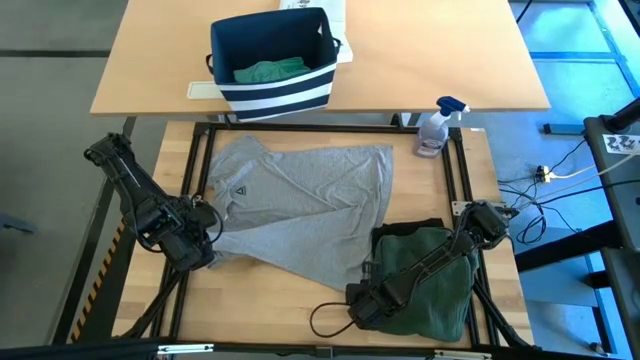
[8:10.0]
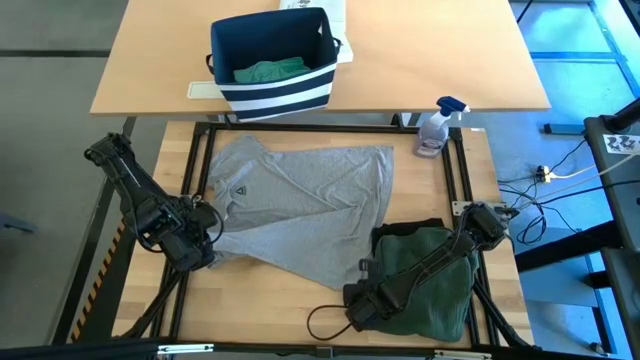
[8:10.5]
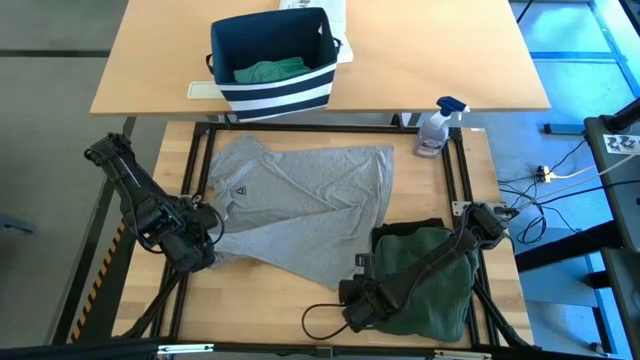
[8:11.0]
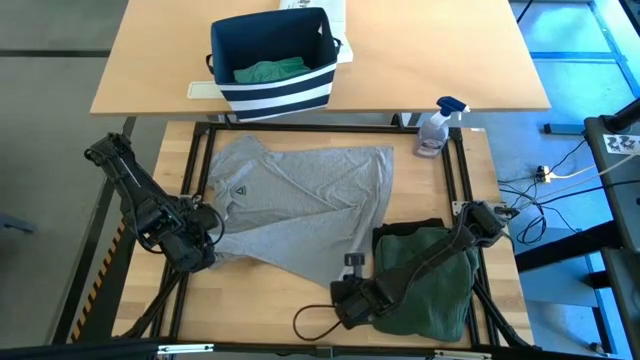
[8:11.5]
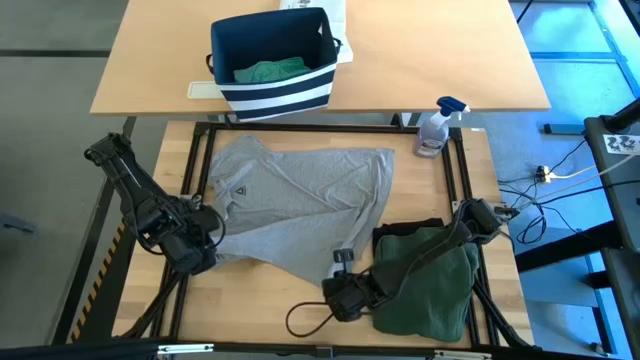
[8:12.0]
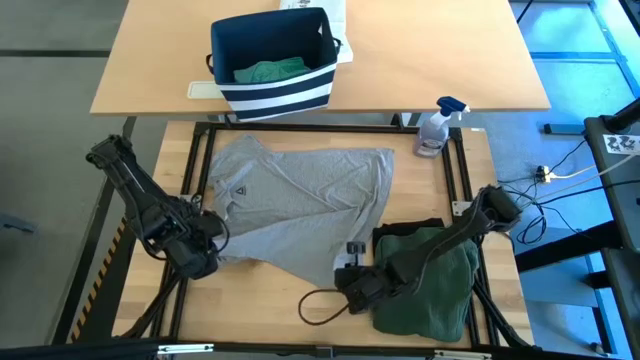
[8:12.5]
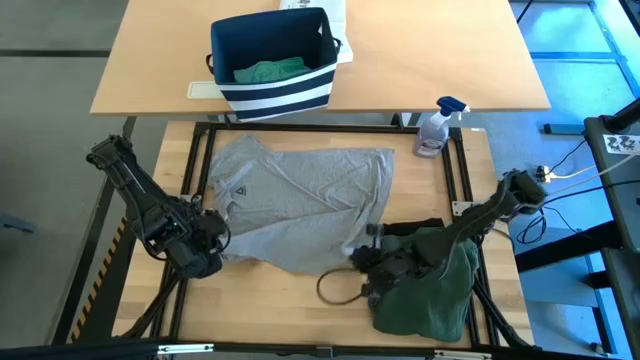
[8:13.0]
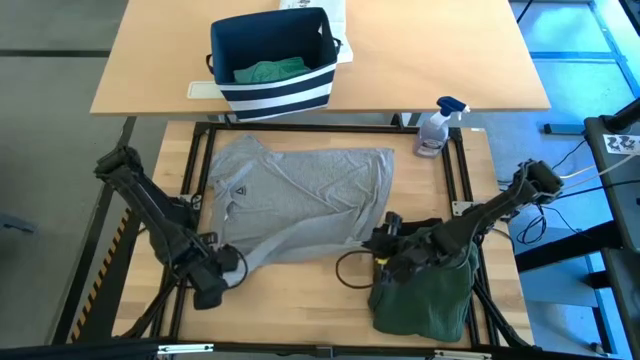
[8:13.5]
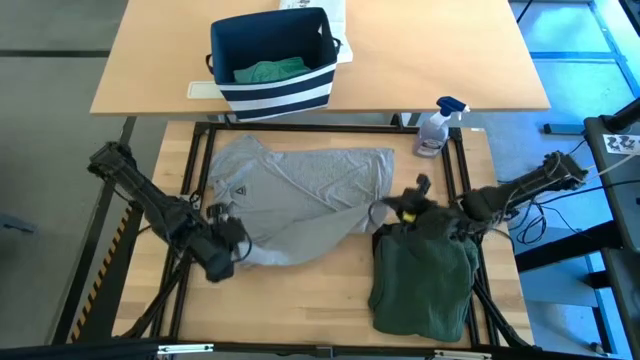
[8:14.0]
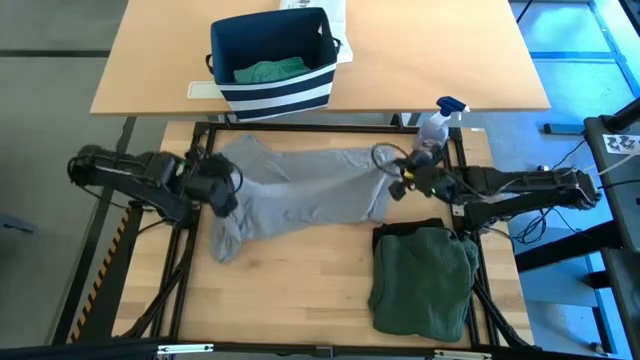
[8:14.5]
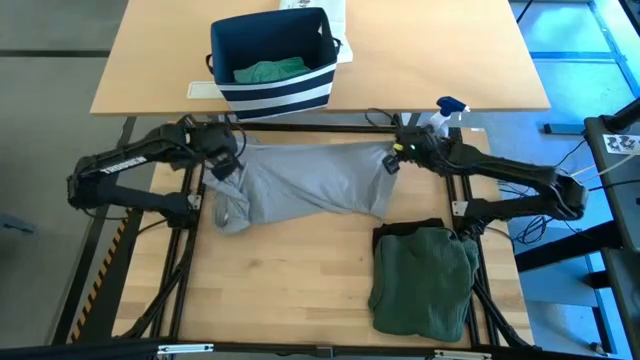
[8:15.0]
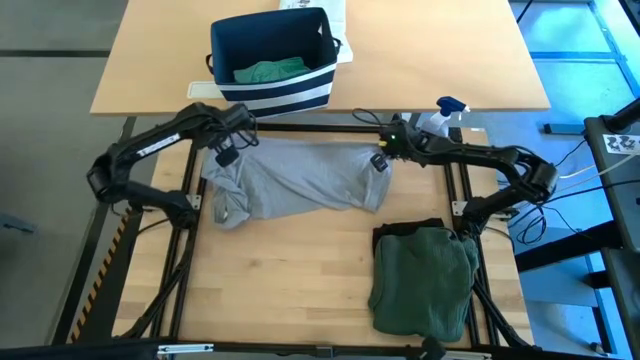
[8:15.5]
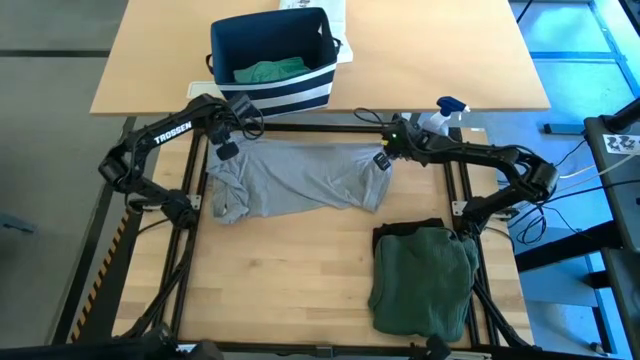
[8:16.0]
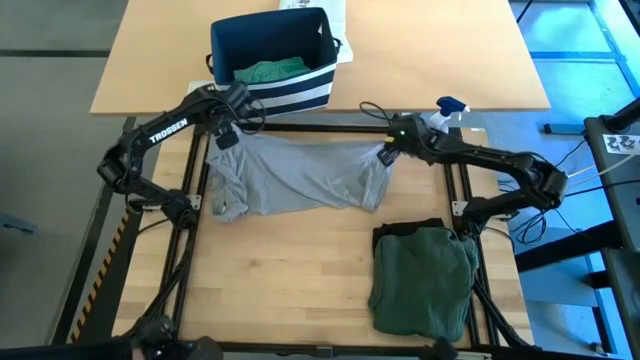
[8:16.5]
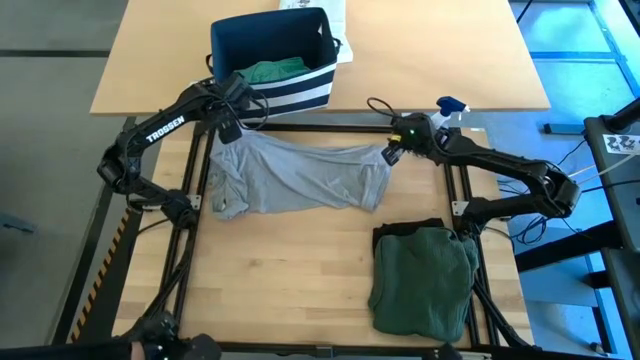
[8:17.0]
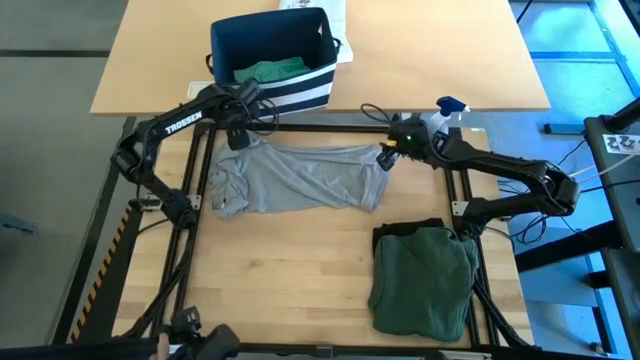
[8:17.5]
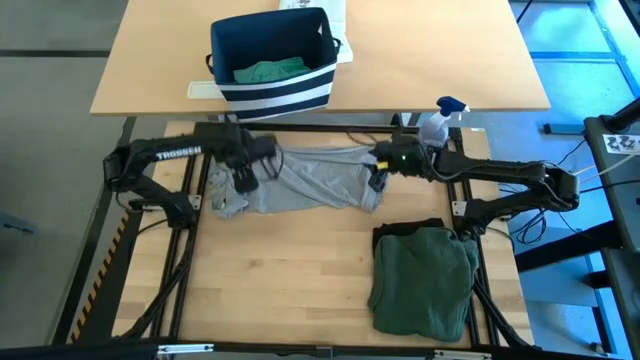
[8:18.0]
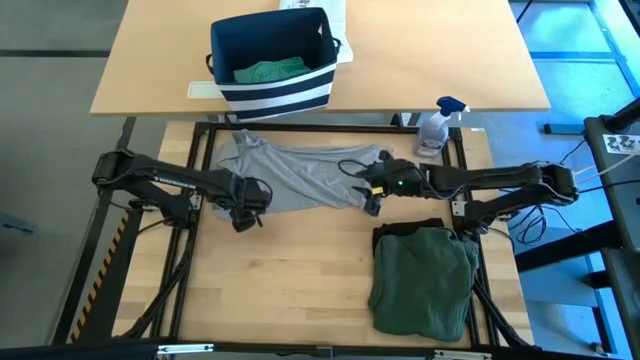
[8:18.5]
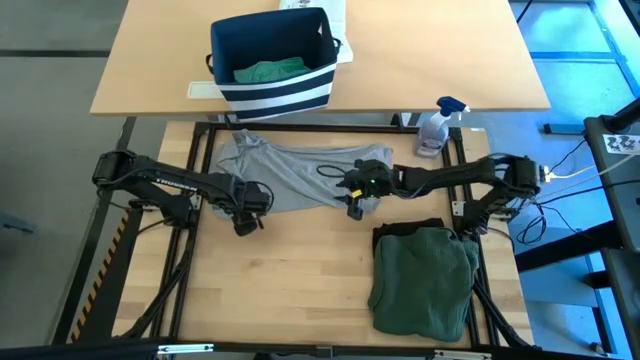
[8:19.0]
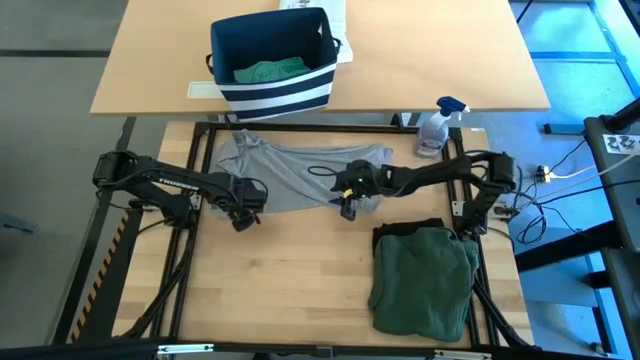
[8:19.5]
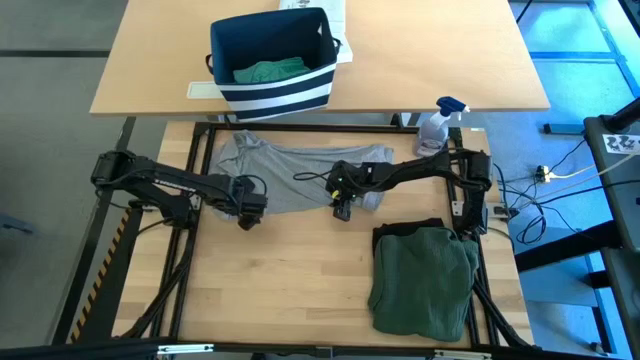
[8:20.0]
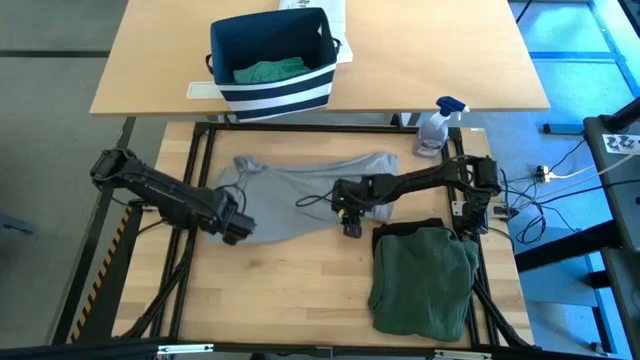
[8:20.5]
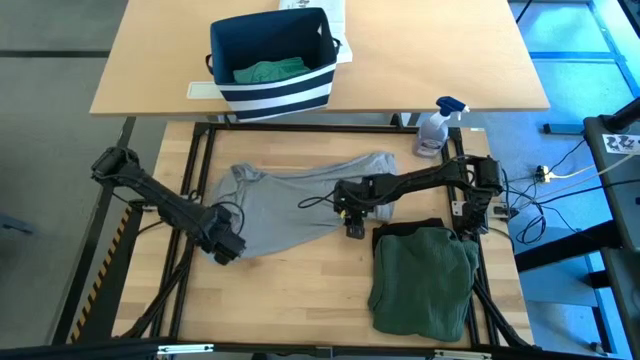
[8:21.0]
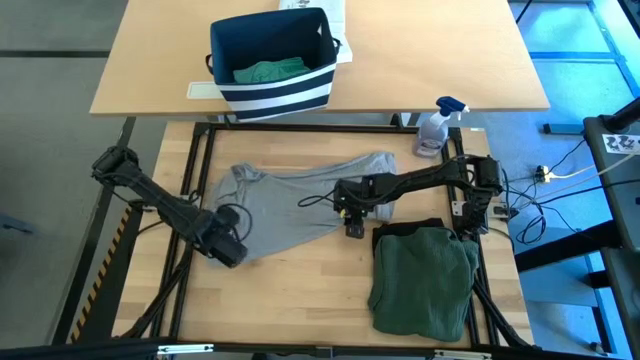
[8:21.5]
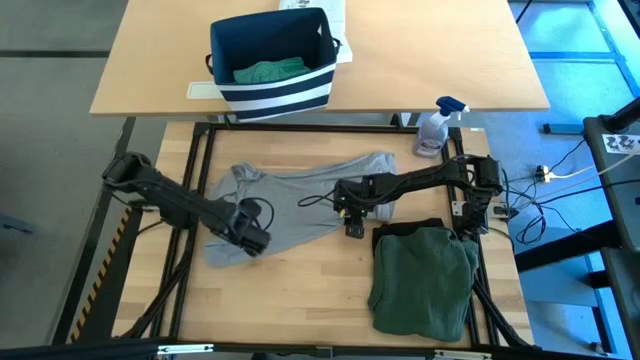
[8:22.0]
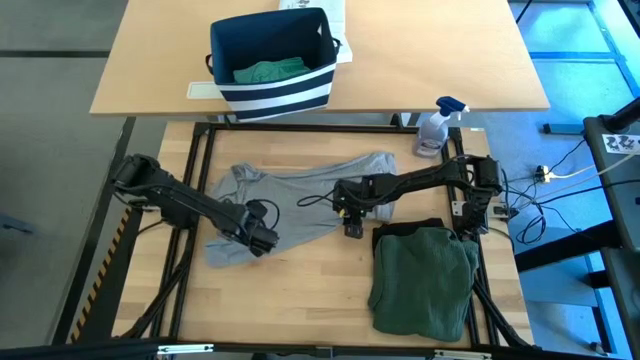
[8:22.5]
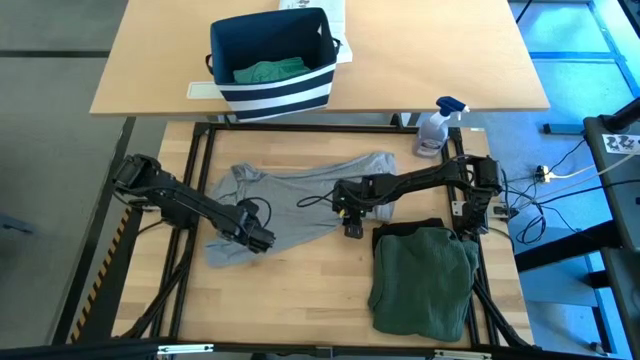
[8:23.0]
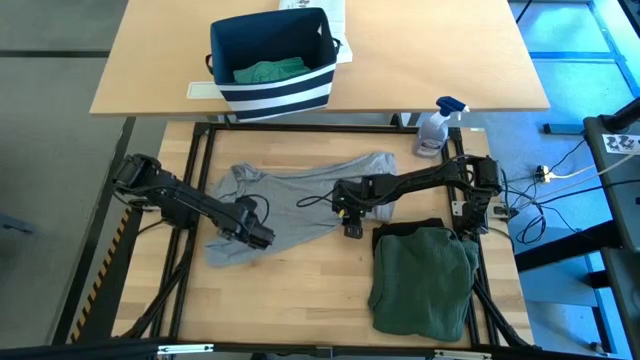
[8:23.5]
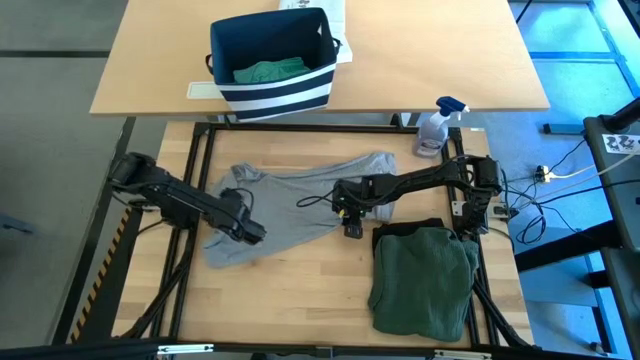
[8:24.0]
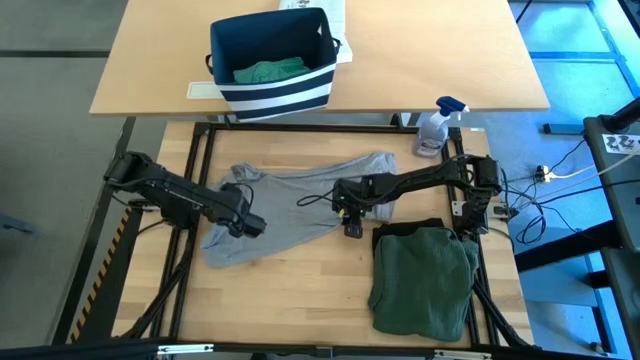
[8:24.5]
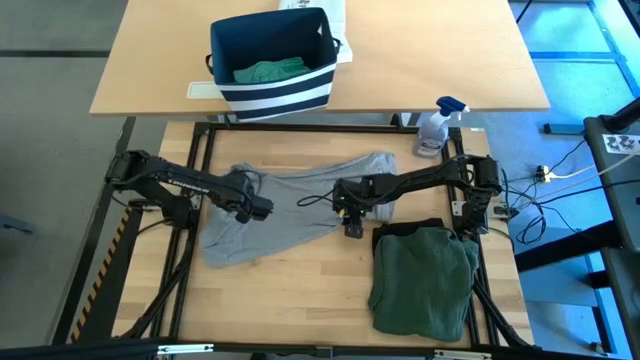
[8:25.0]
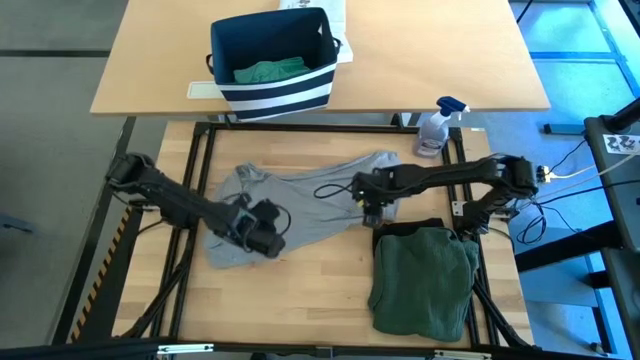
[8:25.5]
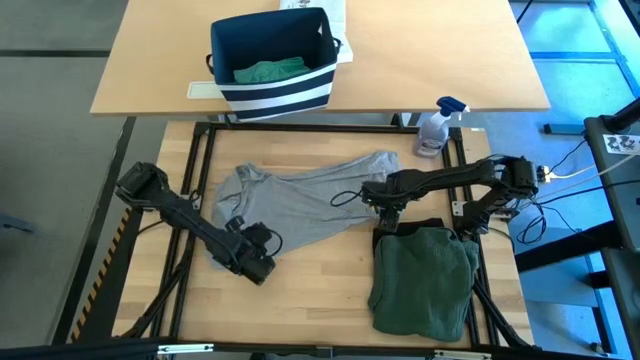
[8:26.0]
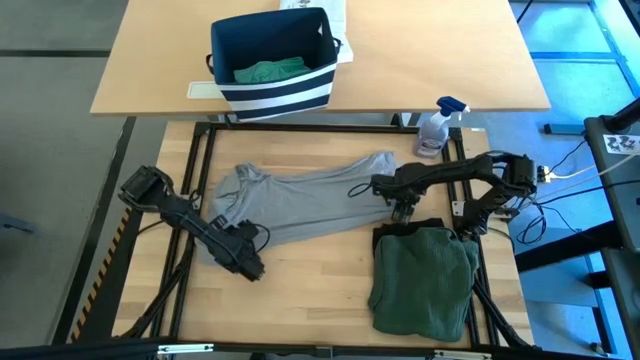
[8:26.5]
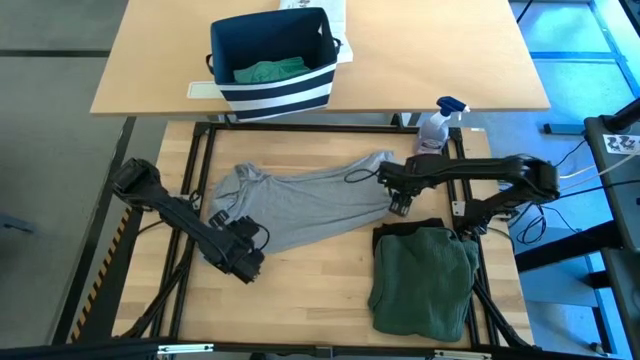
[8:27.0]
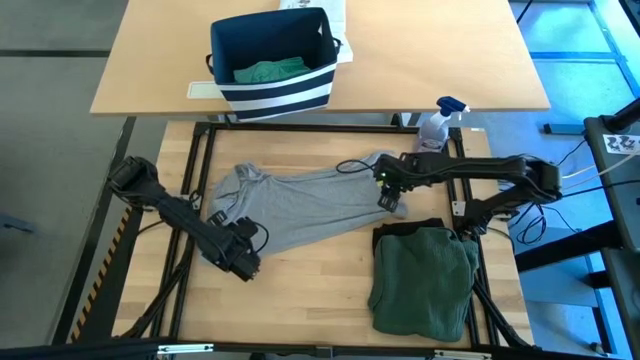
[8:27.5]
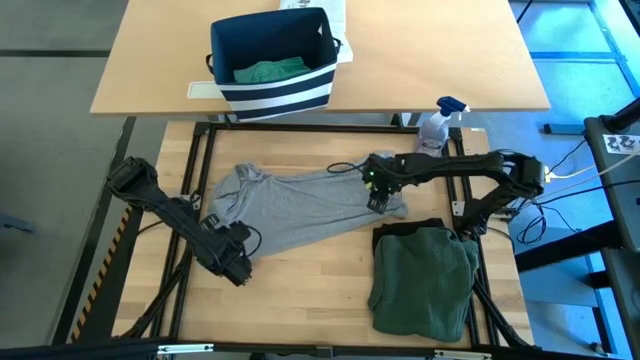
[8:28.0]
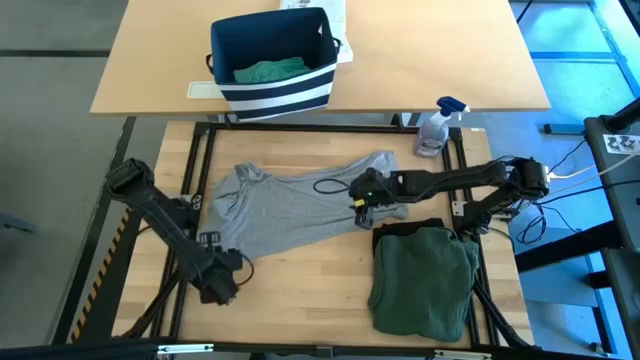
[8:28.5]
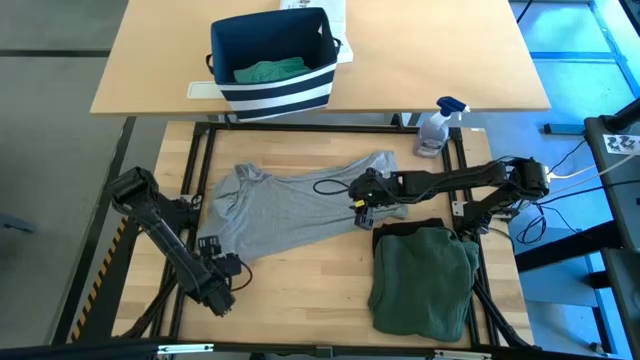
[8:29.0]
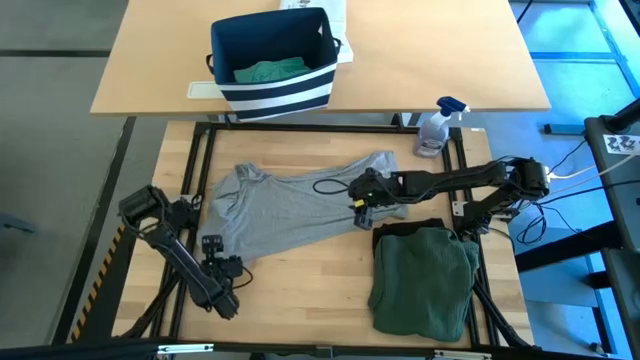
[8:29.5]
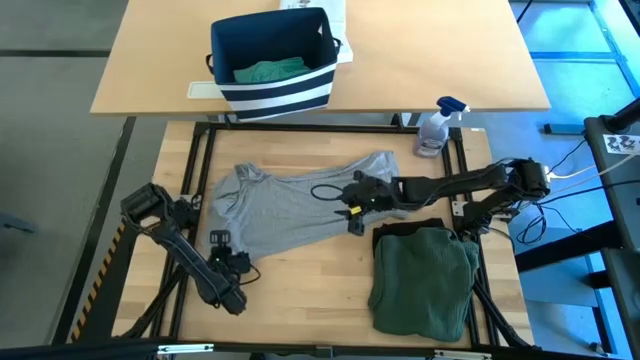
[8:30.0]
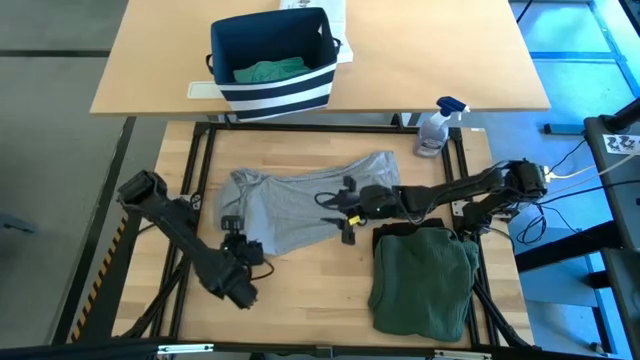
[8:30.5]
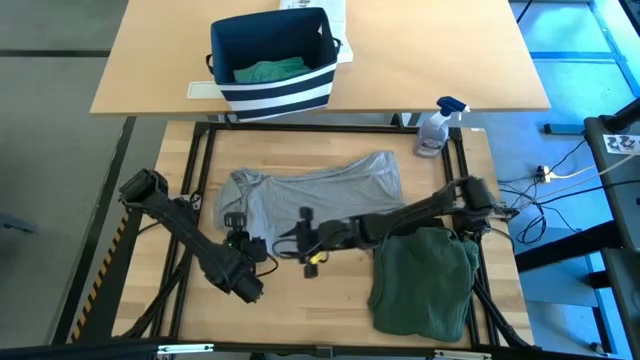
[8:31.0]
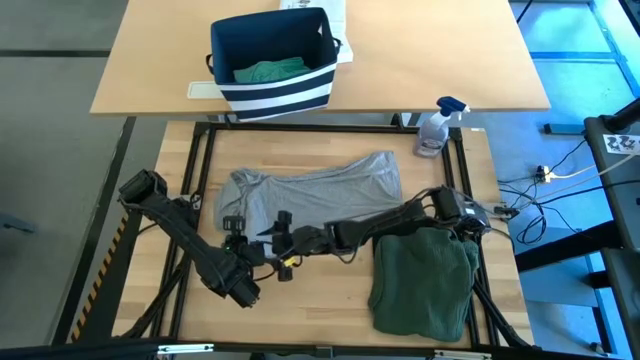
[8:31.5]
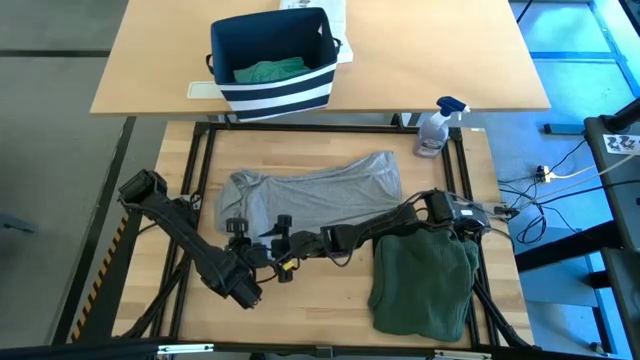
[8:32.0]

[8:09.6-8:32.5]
Task: Fold Laundry from Bin
Fold the gray shirt
